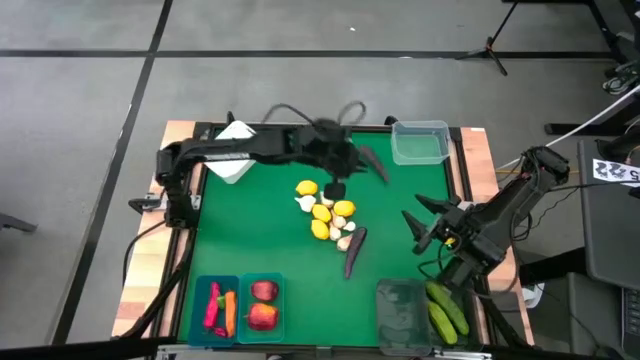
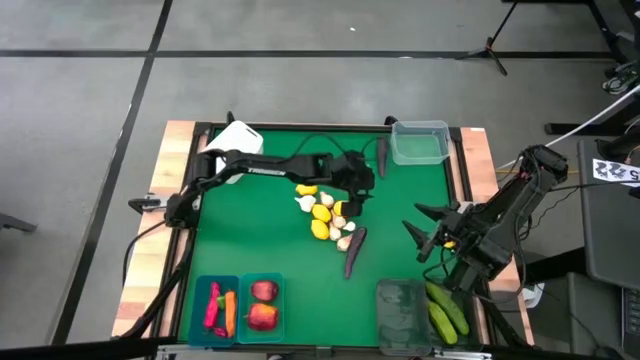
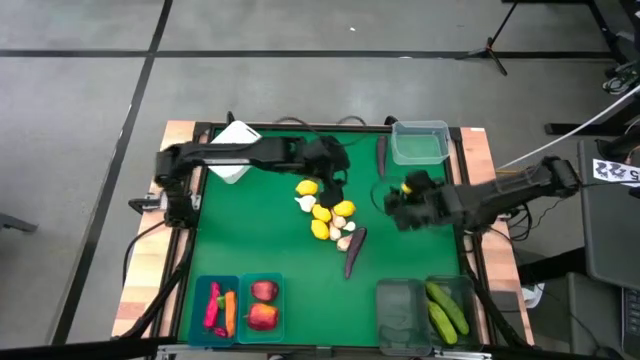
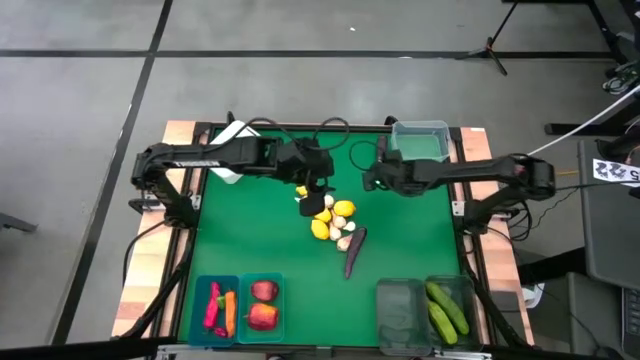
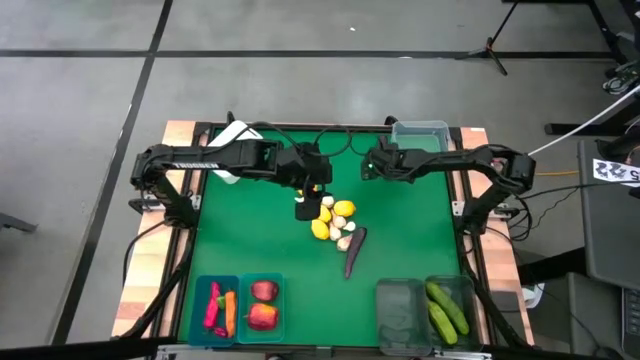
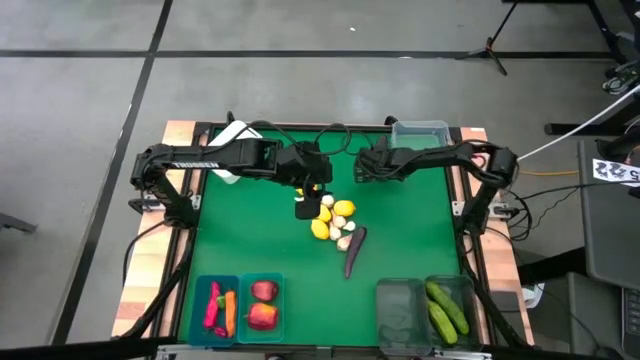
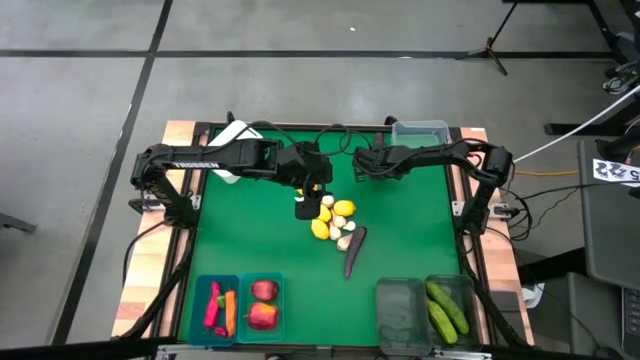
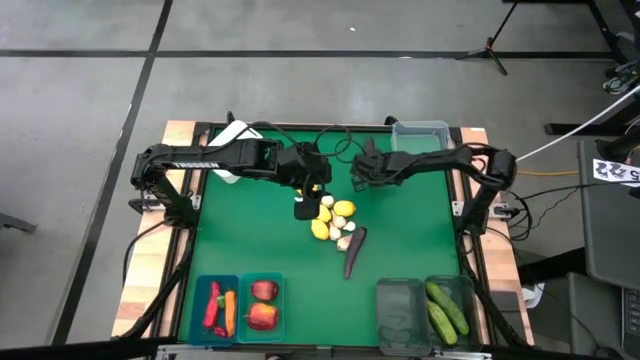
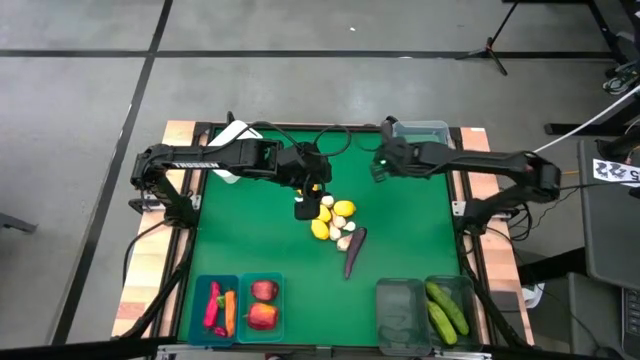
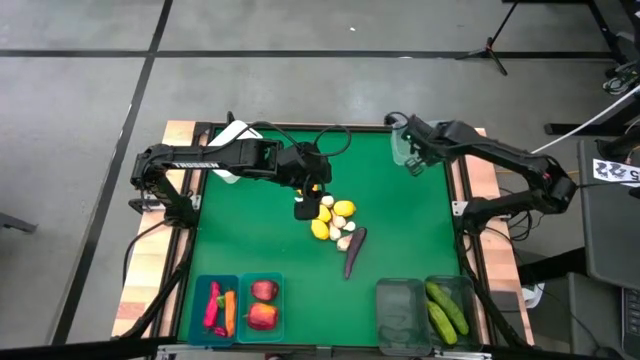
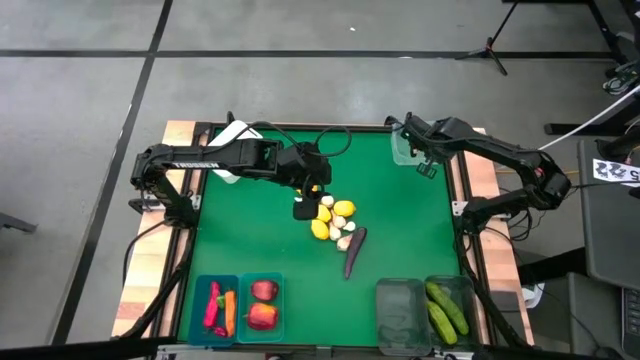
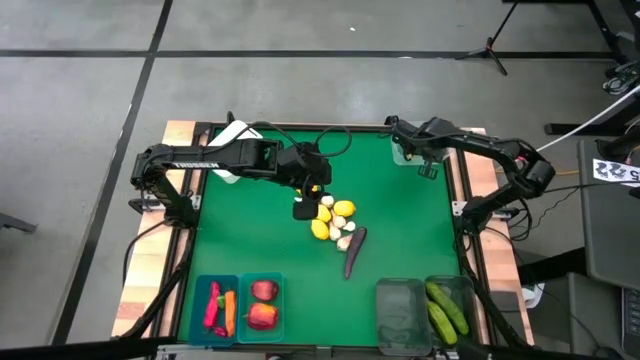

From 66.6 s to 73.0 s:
Task: Sort produce into baskets
Put the eggplant into the transparent bin

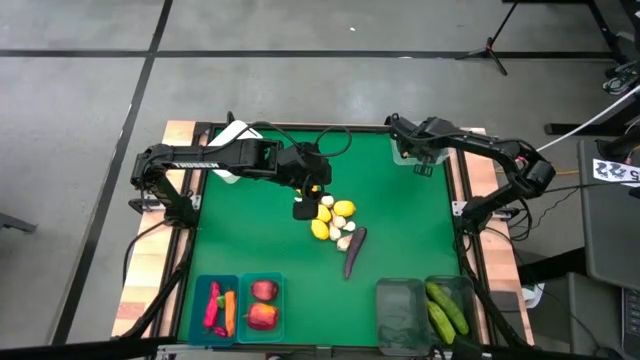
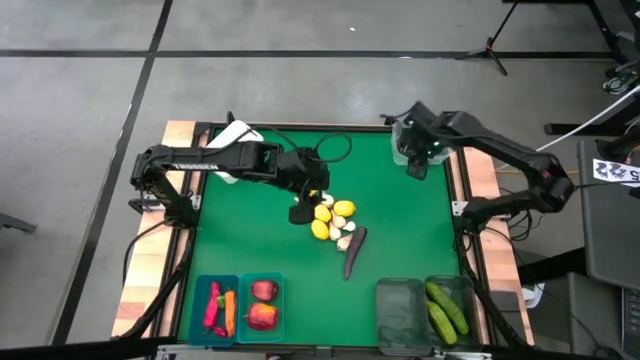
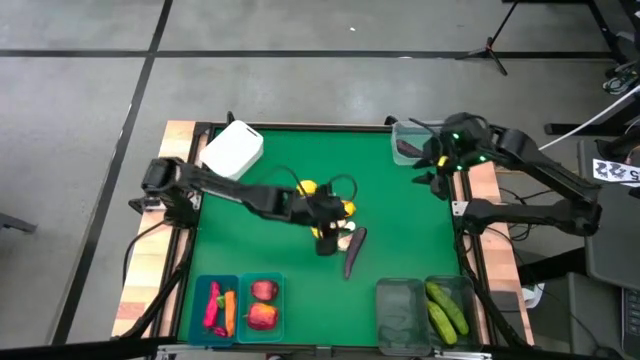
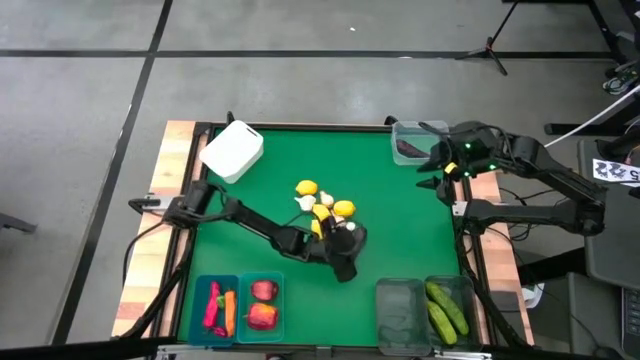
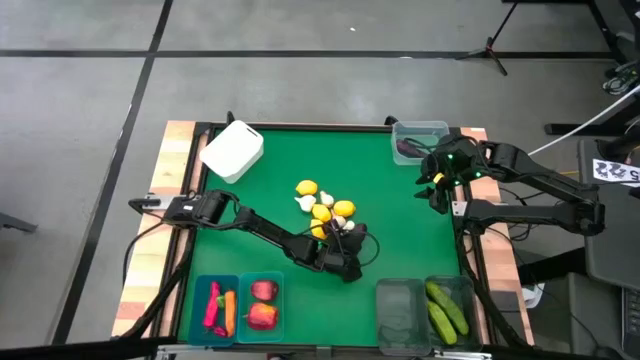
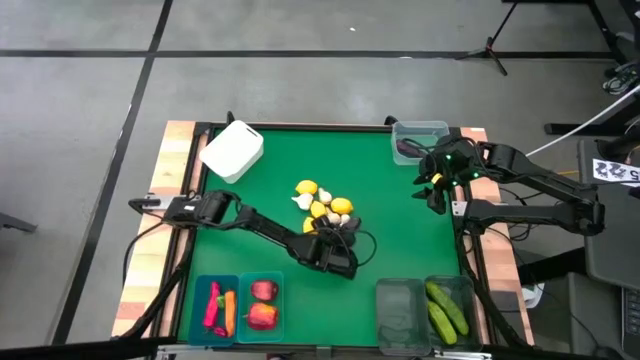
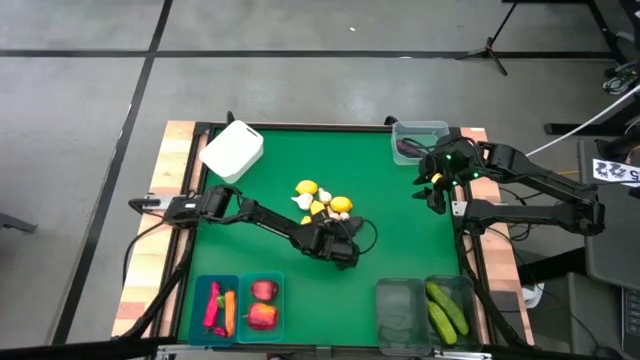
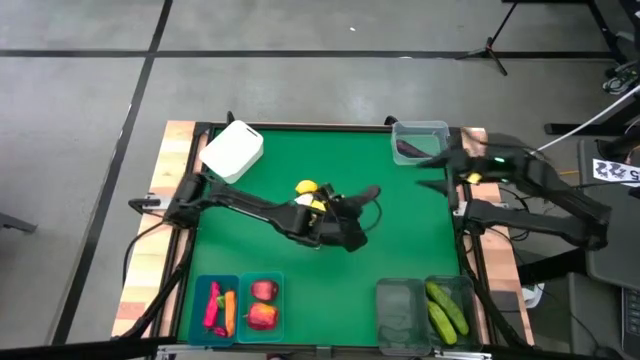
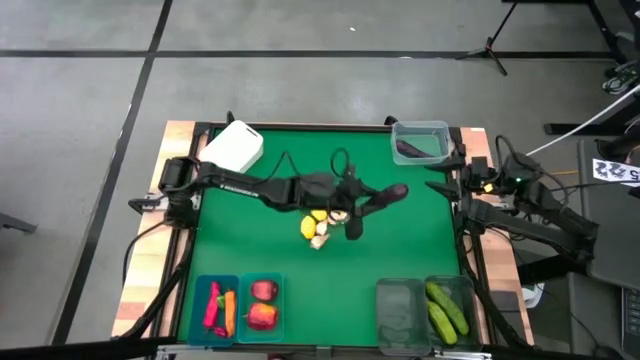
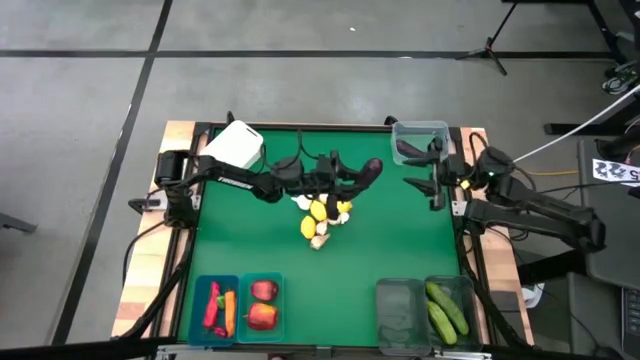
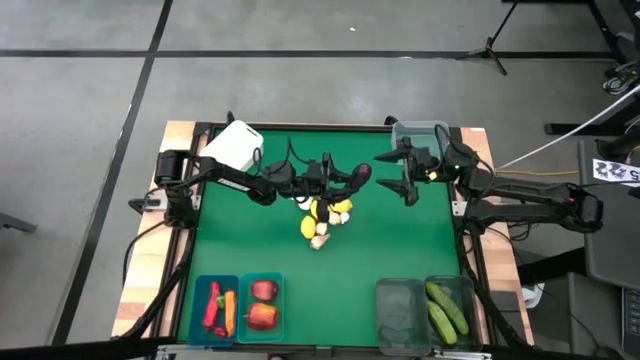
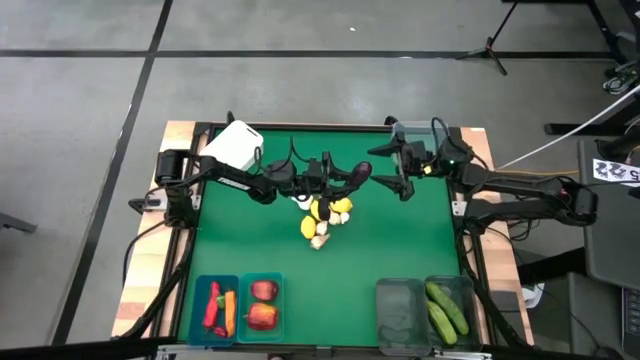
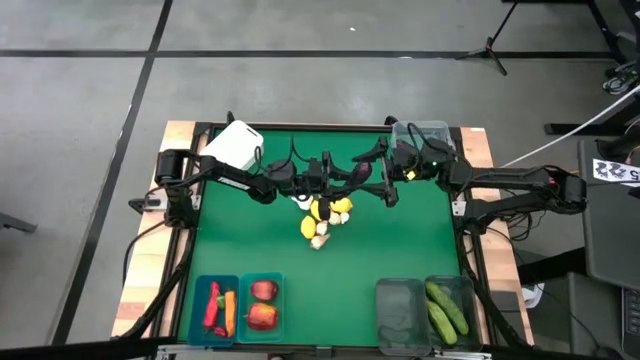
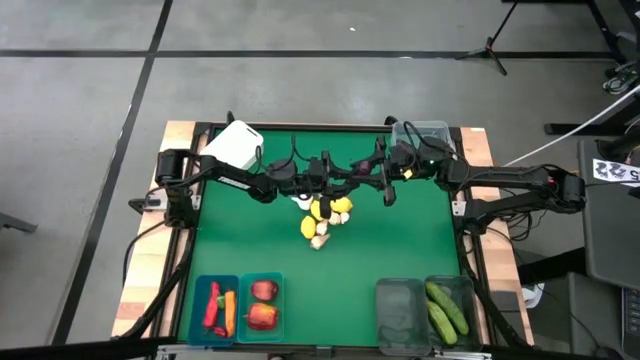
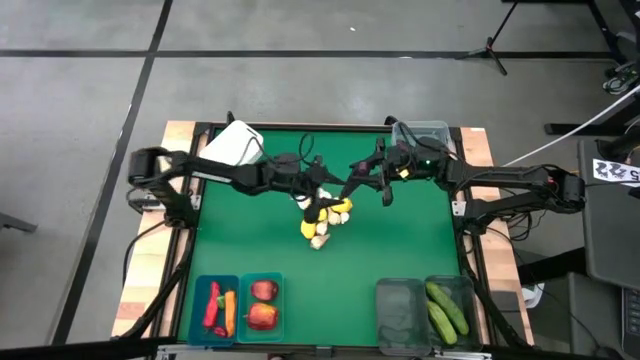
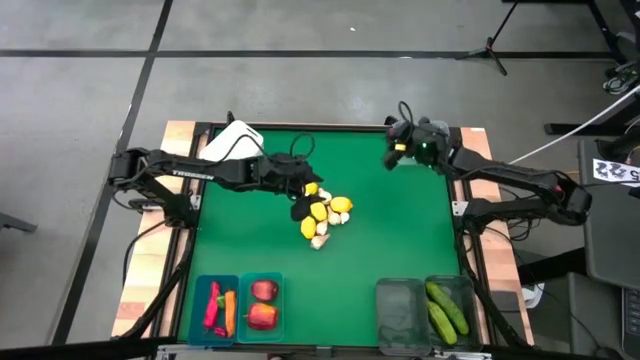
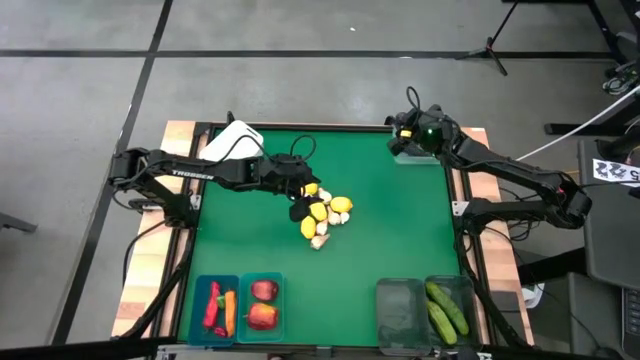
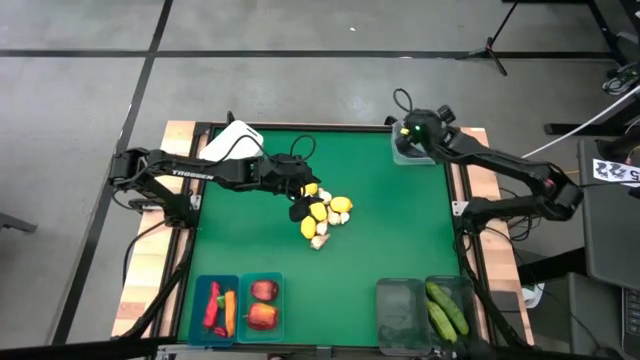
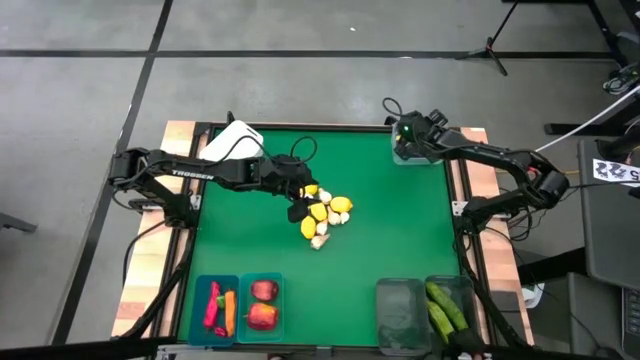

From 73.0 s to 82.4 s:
Put the eggplant into the transparent bin

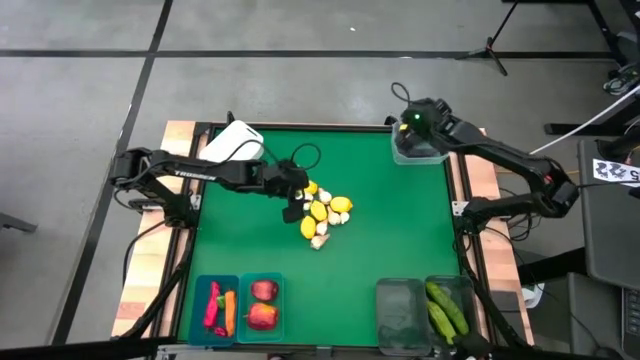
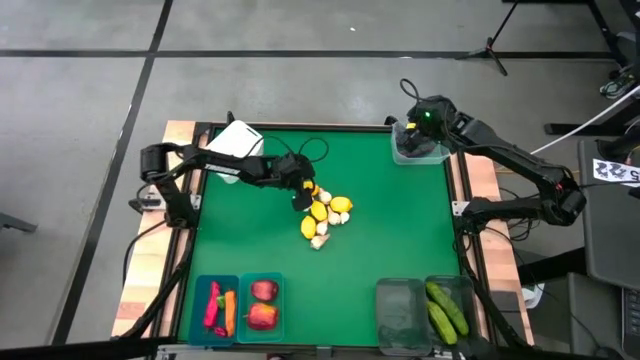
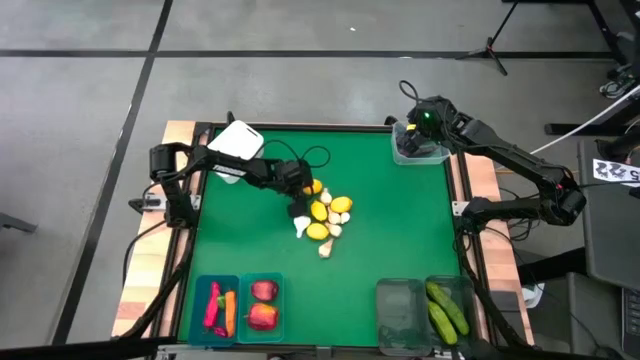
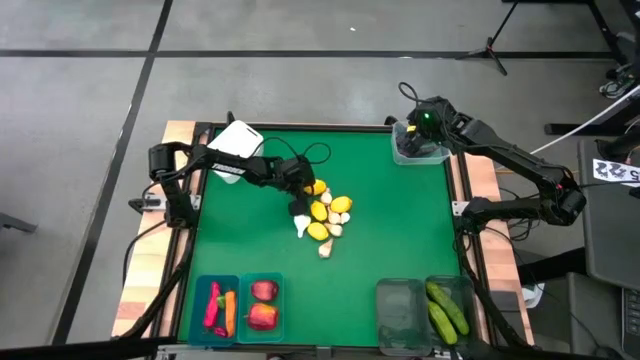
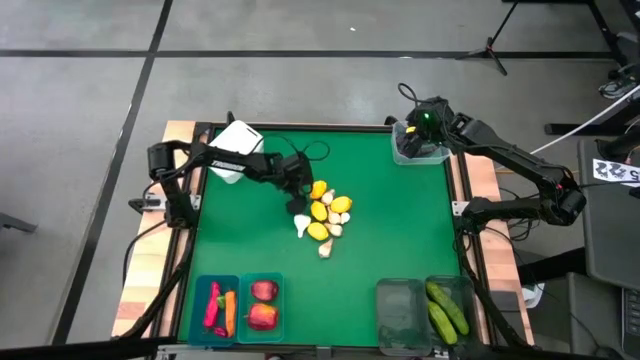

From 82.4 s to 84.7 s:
Put the lemon into the left black bin

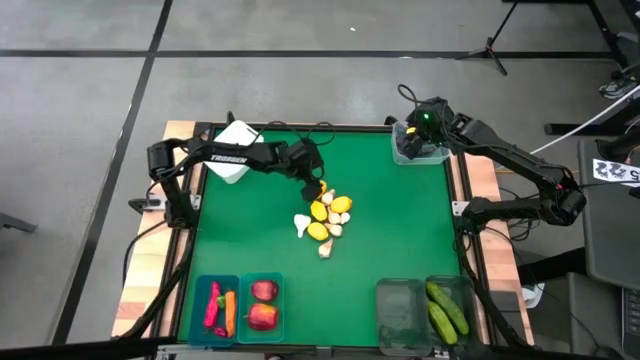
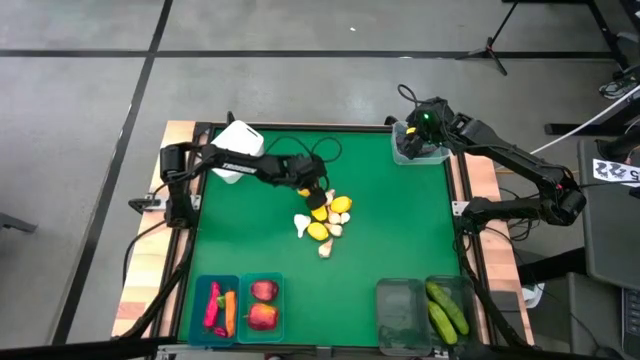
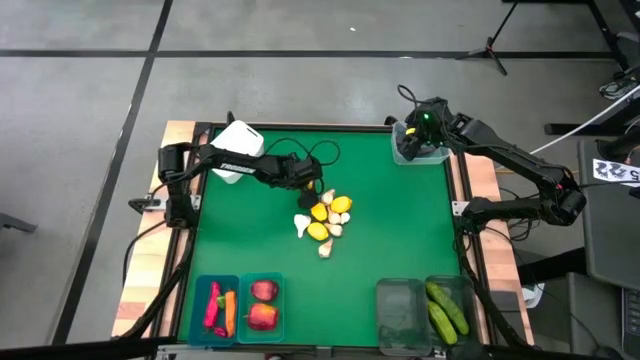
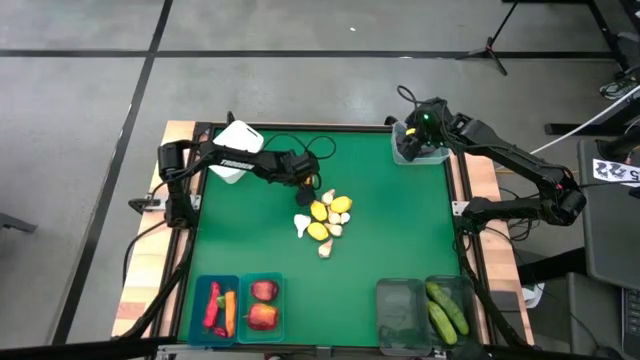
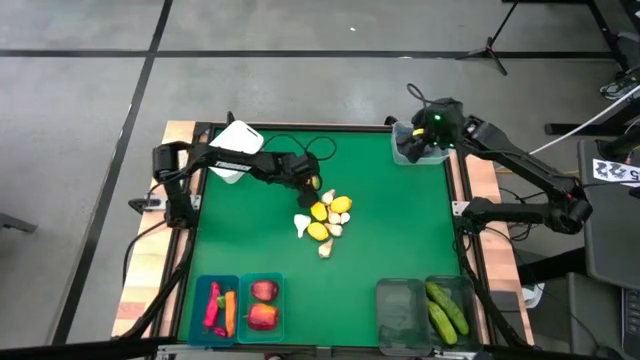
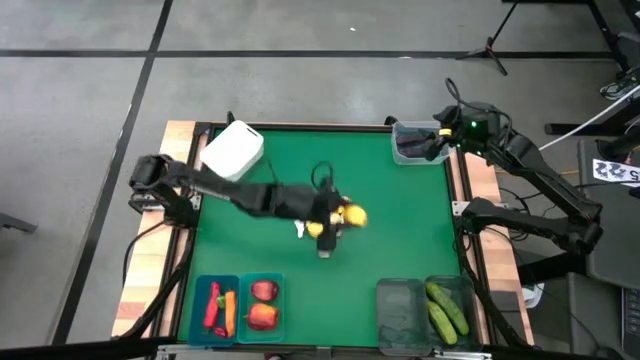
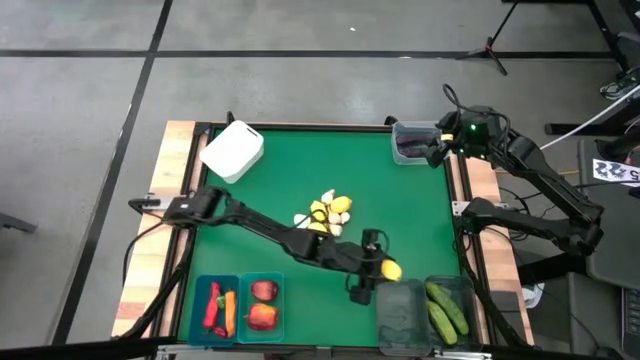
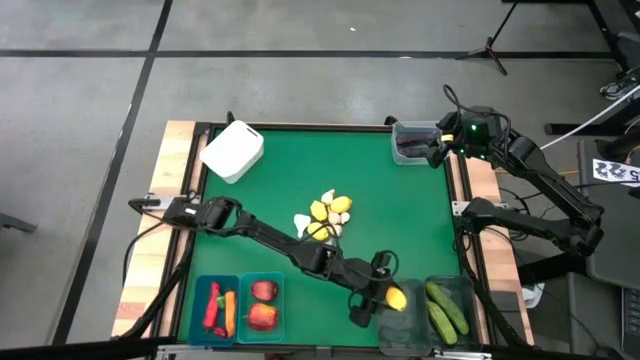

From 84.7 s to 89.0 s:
Put the lemon into the left black bin
